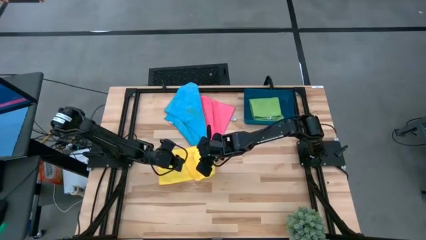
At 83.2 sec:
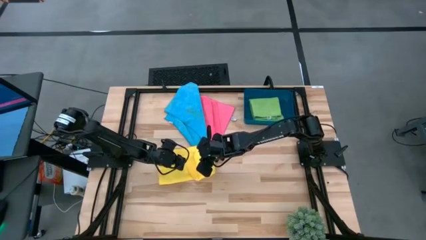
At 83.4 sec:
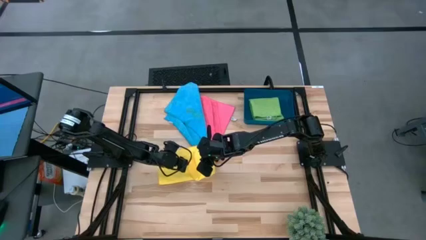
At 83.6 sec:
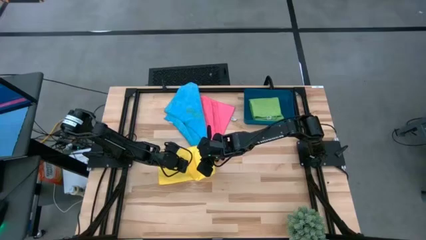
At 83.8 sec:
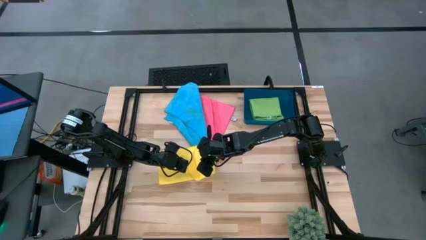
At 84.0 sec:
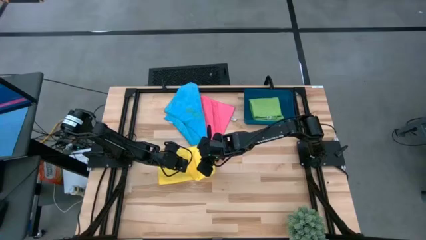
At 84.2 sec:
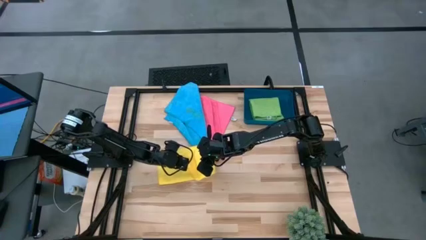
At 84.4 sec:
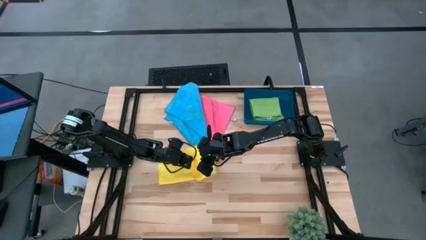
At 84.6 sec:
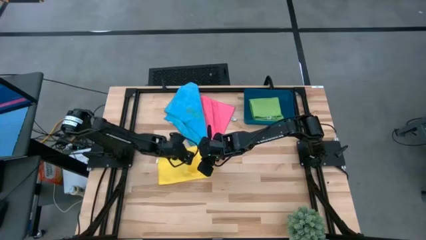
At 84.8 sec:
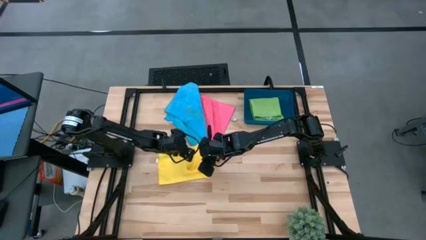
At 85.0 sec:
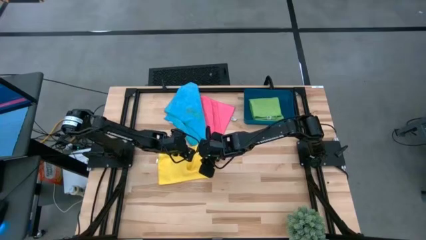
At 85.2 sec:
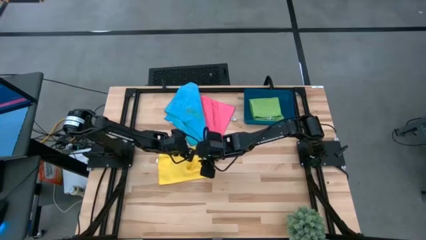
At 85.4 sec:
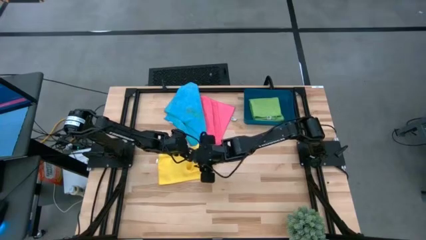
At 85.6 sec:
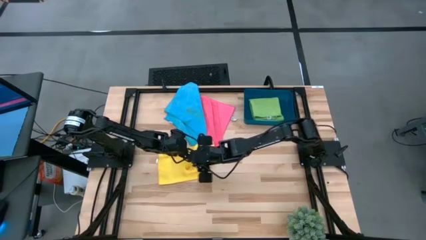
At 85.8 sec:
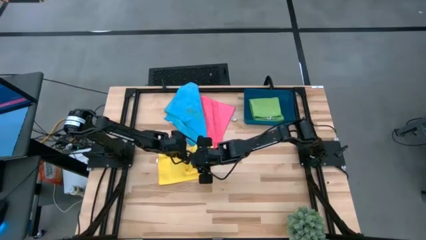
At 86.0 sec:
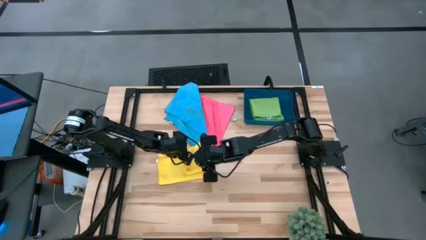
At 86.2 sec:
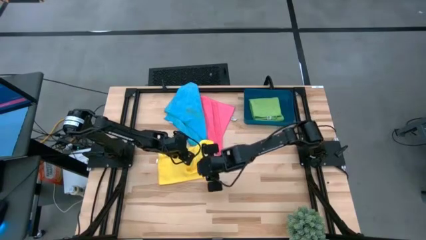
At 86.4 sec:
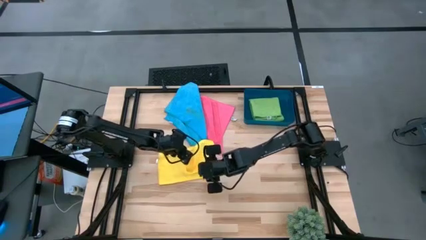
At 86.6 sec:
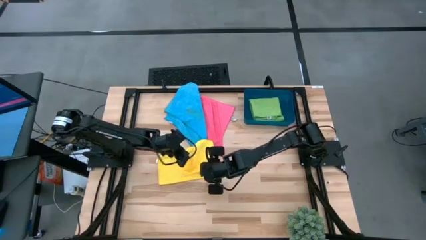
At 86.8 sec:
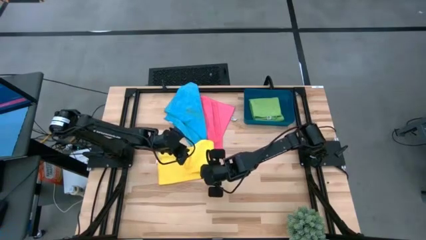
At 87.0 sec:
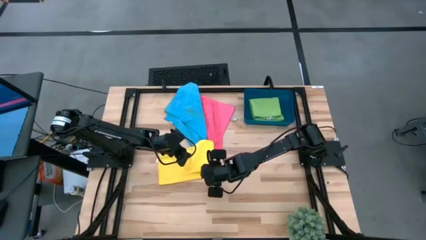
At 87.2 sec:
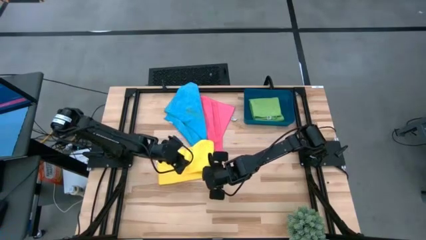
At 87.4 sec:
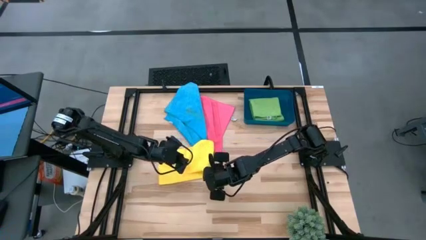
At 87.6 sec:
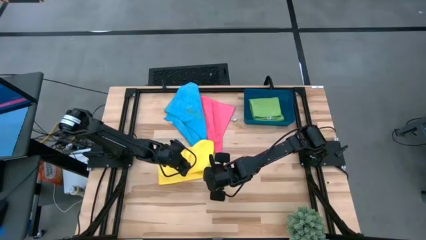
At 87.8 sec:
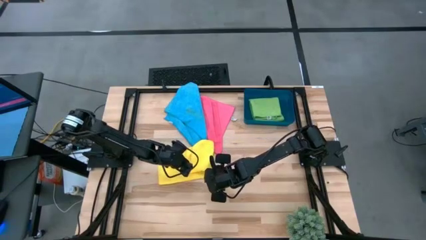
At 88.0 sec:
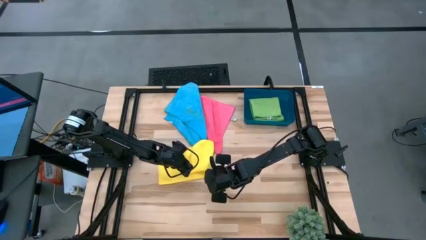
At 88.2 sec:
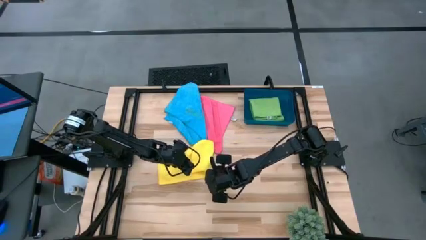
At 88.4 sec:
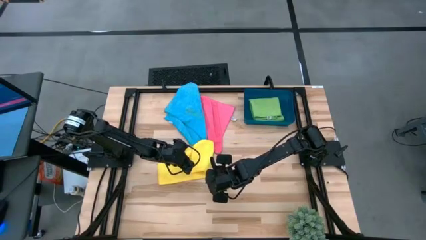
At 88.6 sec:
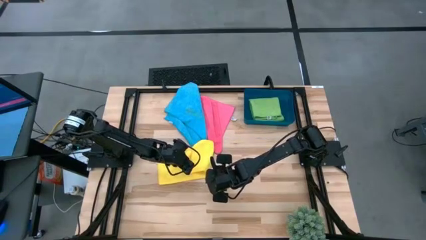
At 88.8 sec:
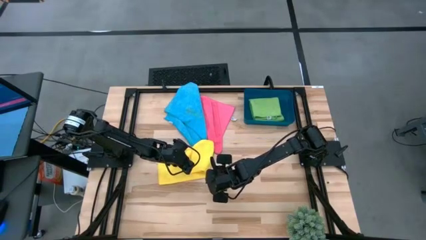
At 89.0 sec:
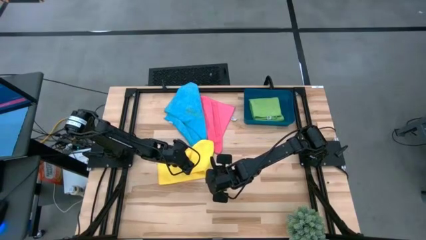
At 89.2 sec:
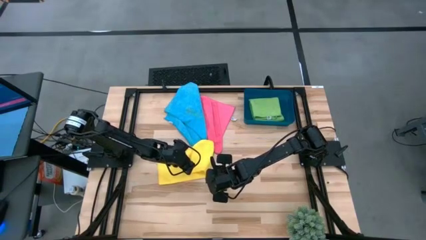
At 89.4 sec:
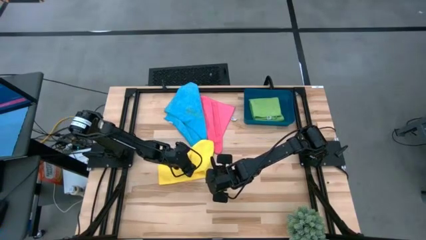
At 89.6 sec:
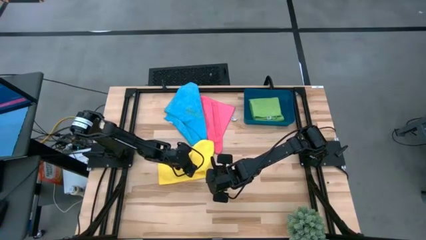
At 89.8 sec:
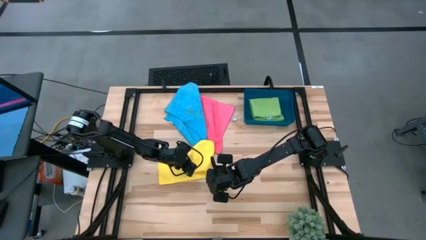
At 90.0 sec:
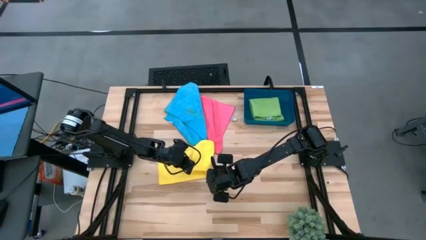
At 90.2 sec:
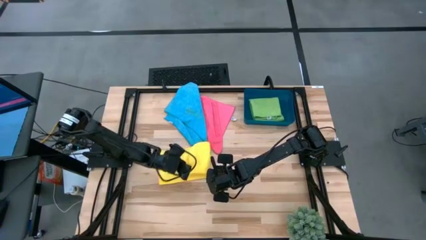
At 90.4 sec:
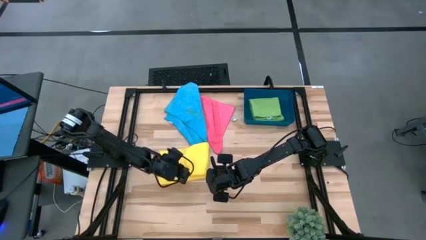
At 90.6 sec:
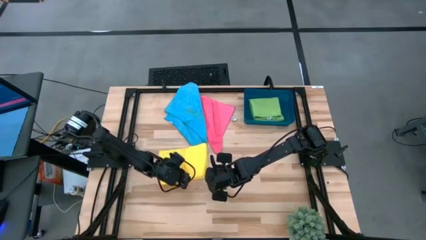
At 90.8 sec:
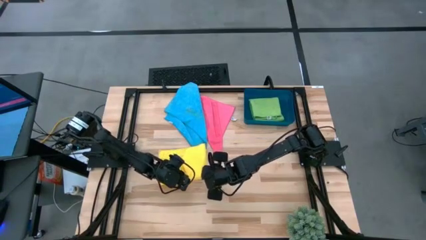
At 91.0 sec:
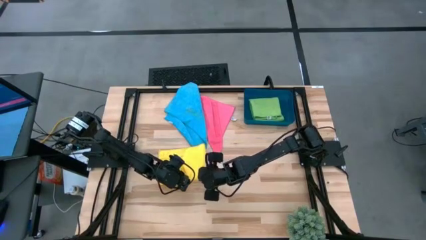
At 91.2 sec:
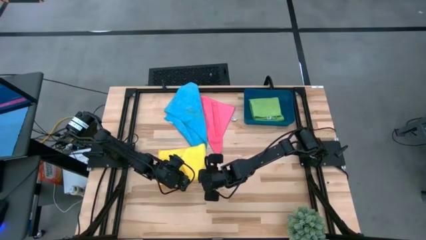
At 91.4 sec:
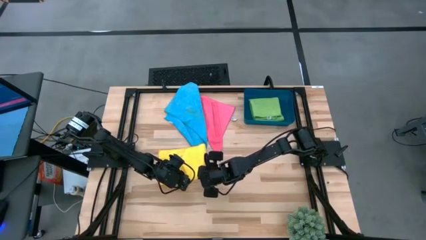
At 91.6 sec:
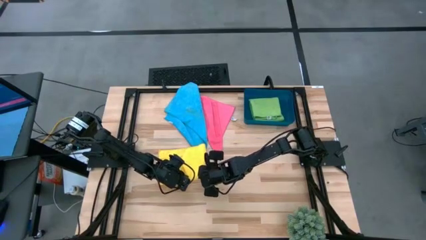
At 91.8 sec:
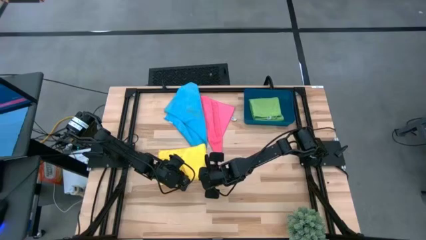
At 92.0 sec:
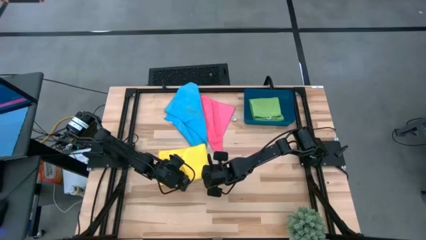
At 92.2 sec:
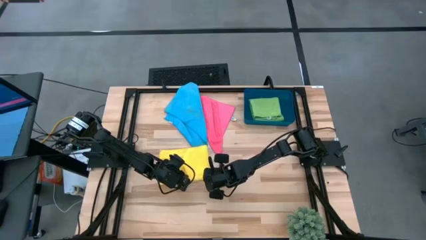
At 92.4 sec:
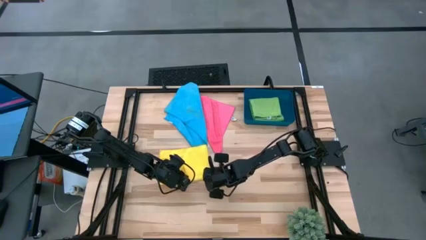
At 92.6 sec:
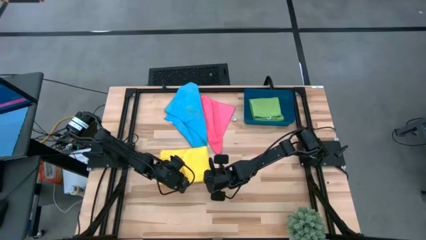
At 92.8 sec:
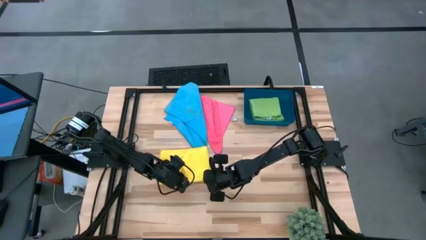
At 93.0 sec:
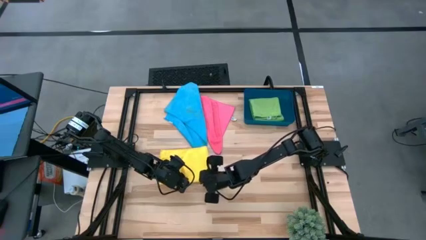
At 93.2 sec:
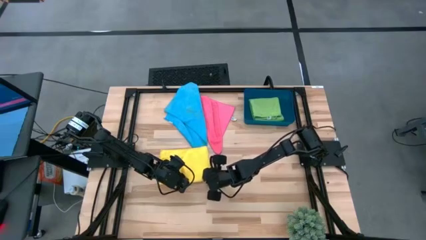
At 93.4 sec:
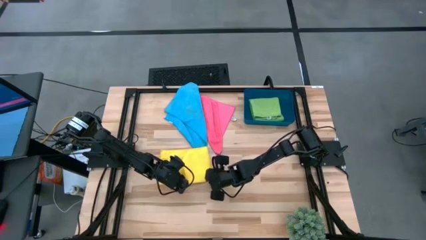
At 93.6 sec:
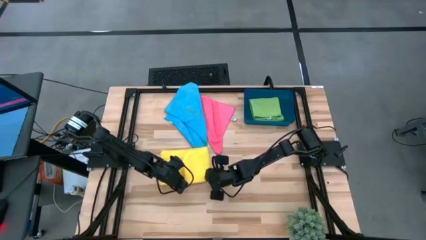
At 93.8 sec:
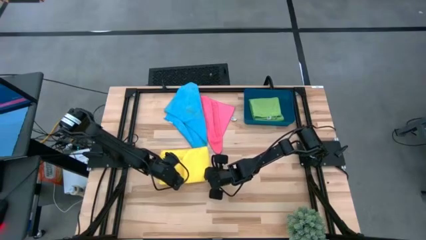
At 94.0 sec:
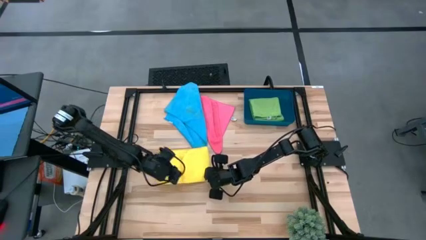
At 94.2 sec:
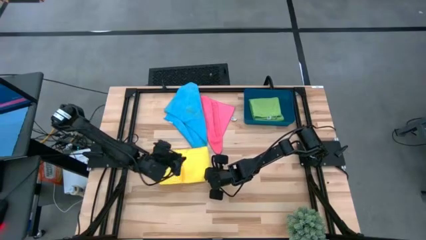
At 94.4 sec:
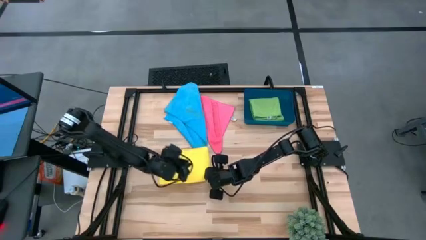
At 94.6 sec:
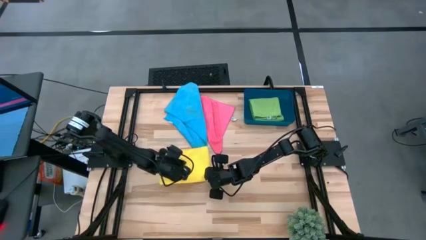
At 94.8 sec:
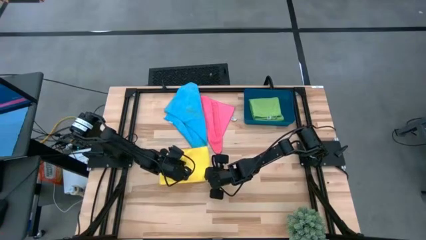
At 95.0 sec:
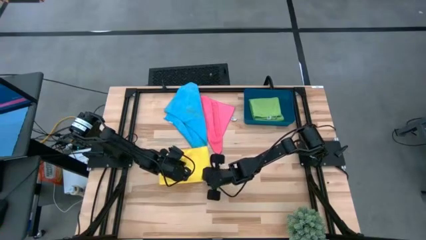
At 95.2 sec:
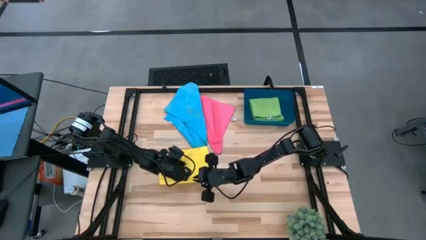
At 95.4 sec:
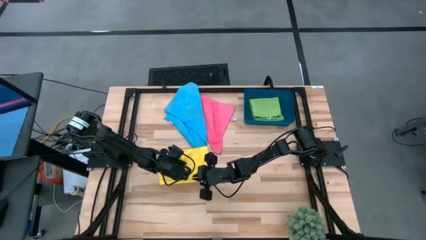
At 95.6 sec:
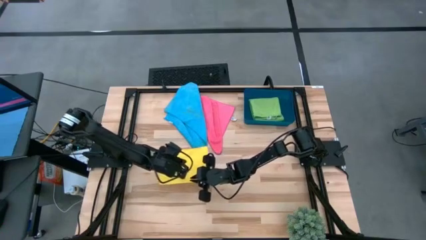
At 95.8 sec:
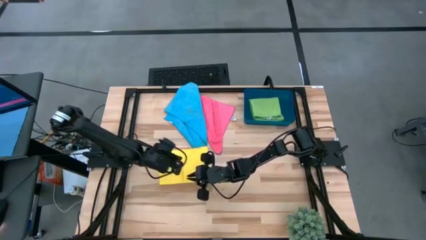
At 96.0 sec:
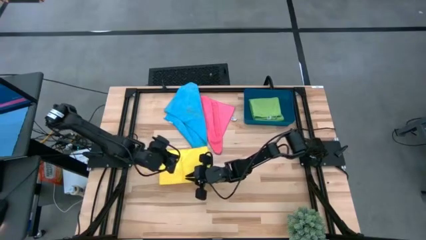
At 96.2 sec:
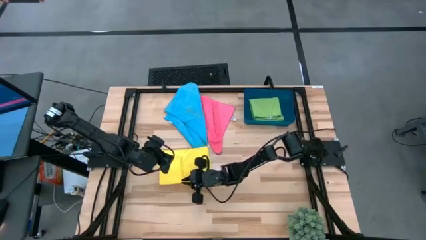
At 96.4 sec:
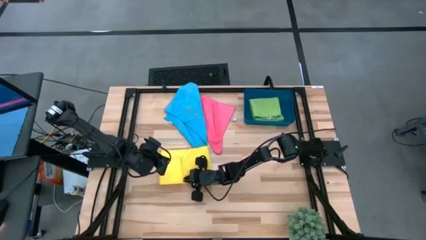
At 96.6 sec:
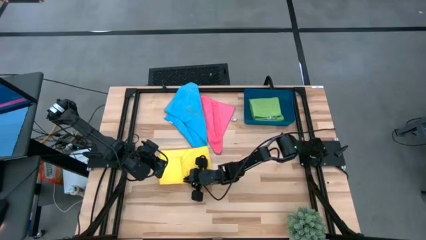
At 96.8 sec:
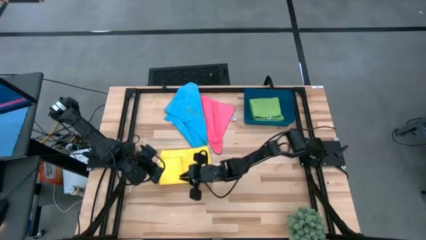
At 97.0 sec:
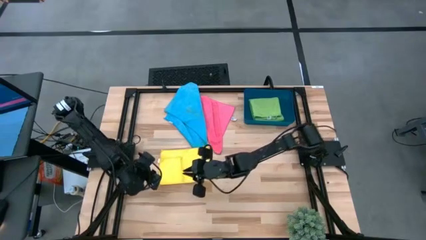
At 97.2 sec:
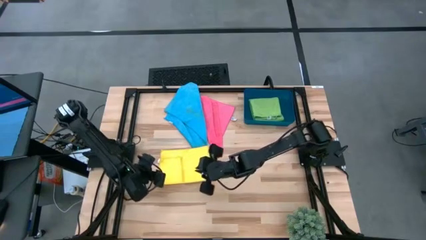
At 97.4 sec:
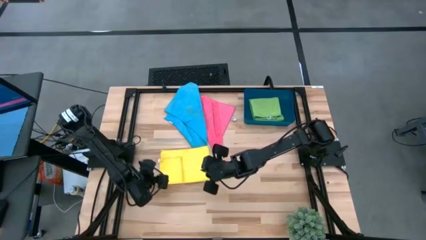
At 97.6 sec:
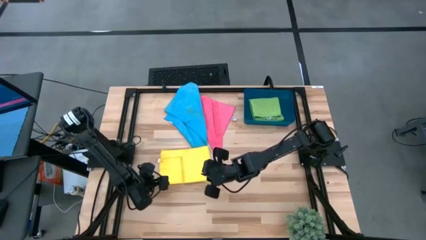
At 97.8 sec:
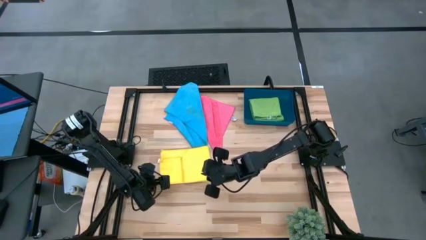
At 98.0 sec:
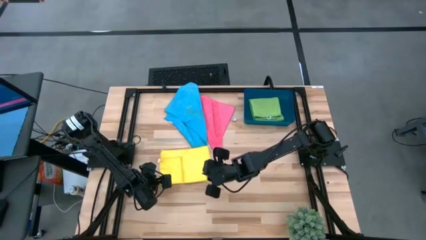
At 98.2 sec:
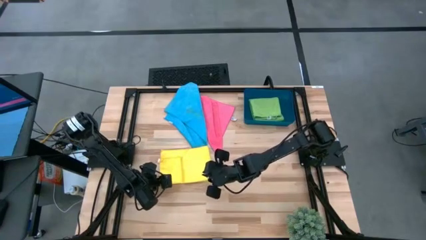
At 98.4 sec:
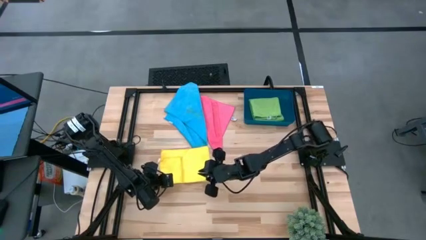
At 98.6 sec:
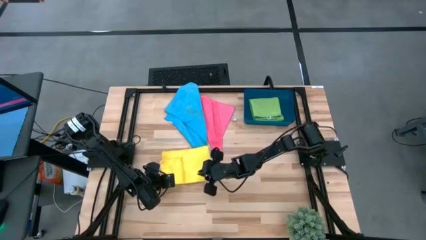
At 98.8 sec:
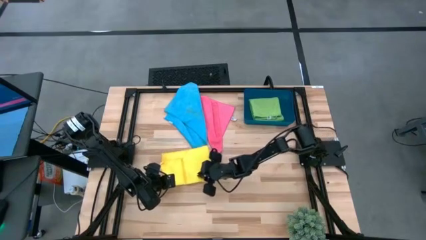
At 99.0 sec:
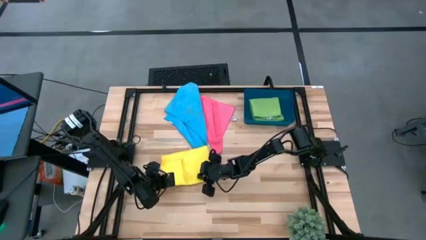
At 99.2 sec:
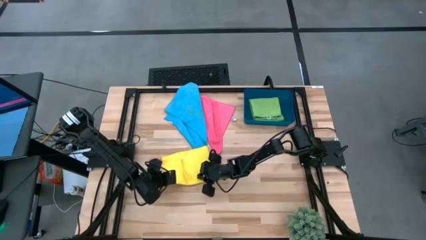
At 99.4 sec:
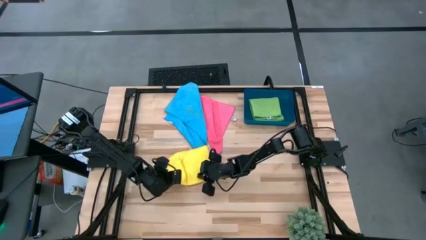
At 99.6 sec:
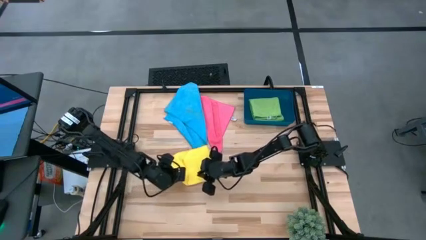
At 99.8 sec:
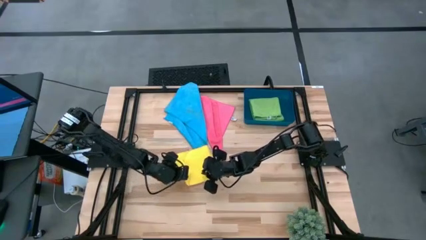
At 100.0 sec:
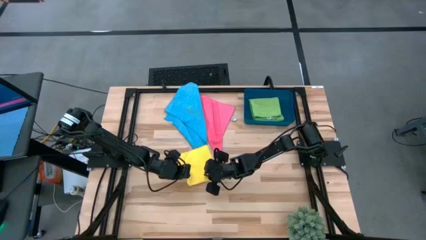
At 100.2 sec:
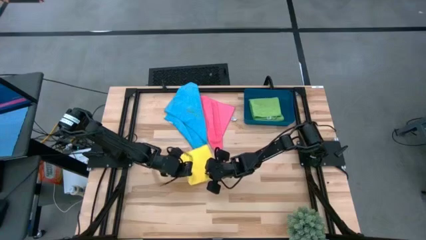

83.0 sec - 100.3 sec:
Task: Fold microfiber towels
Fold the yellow towel
